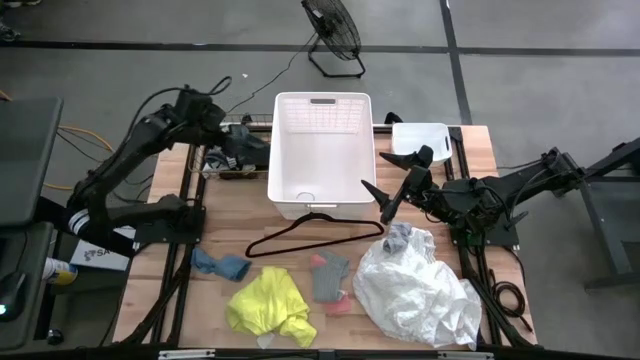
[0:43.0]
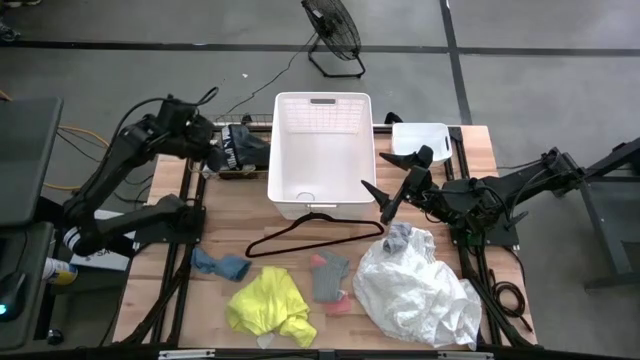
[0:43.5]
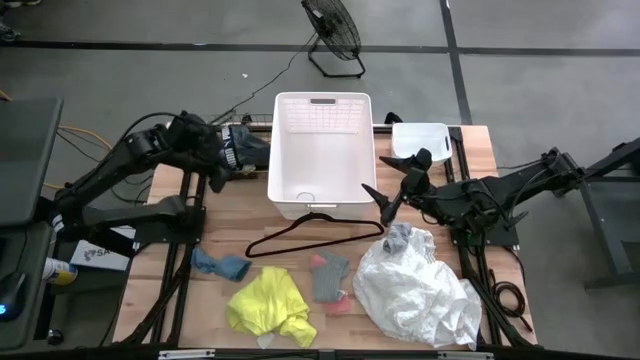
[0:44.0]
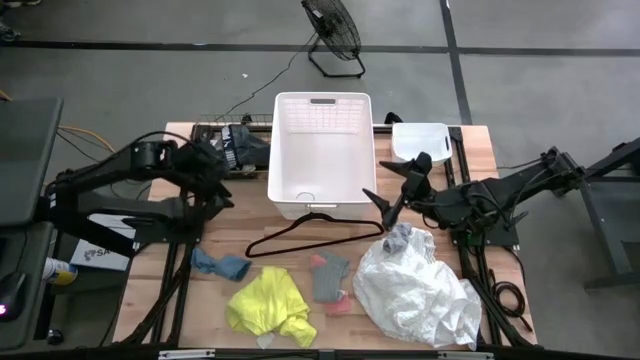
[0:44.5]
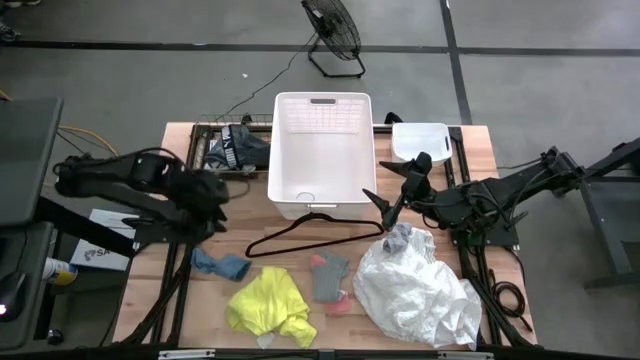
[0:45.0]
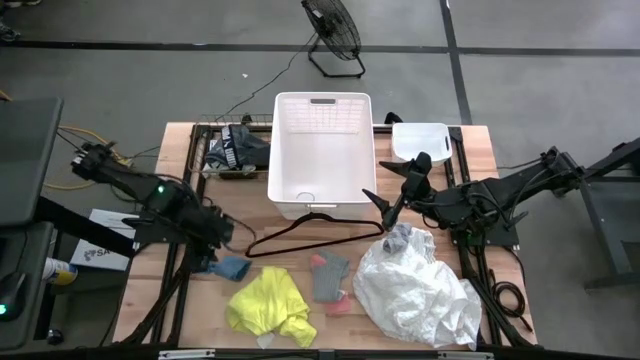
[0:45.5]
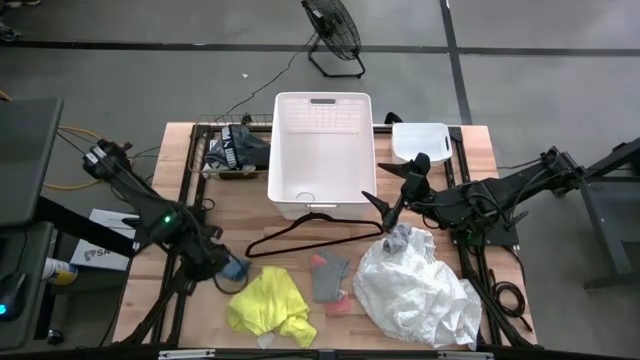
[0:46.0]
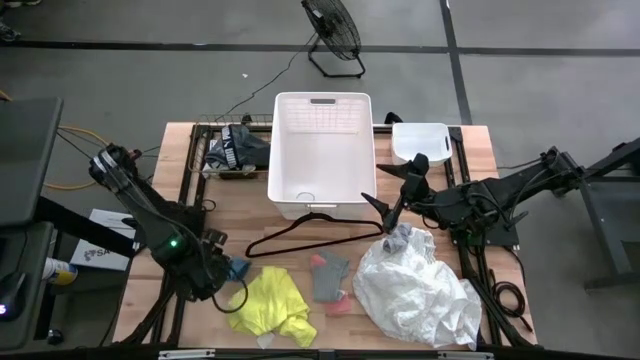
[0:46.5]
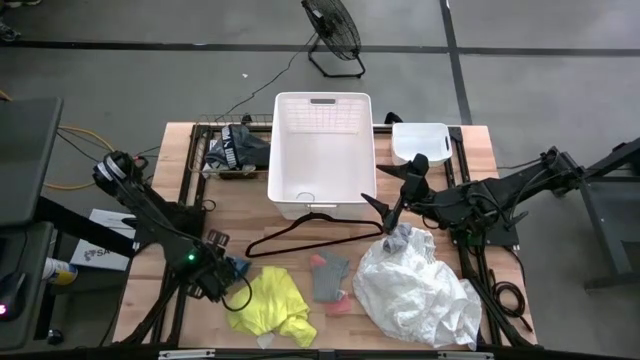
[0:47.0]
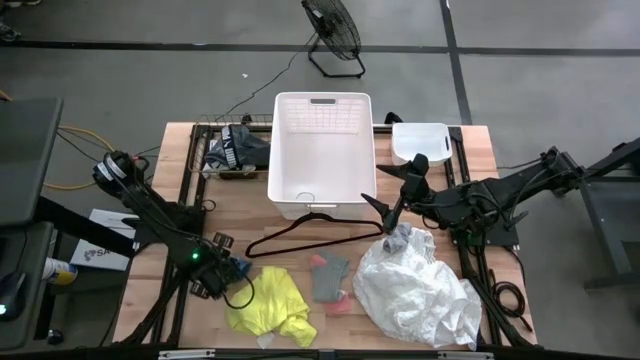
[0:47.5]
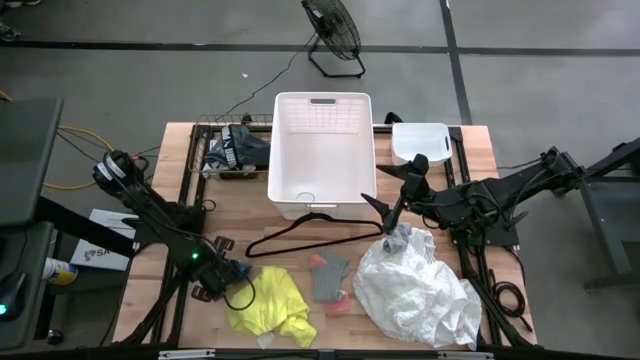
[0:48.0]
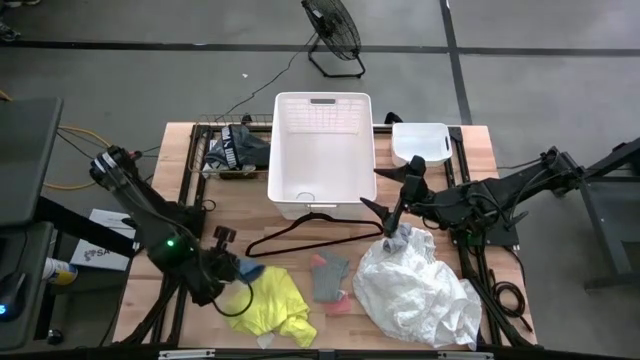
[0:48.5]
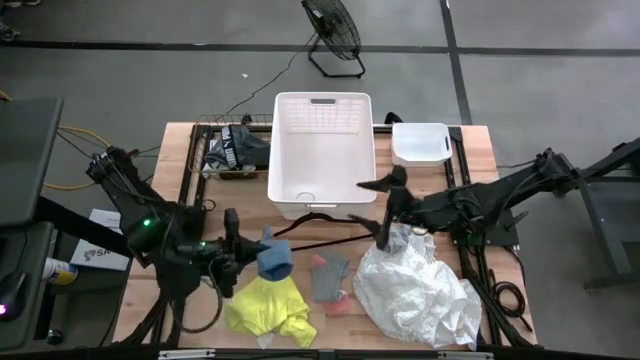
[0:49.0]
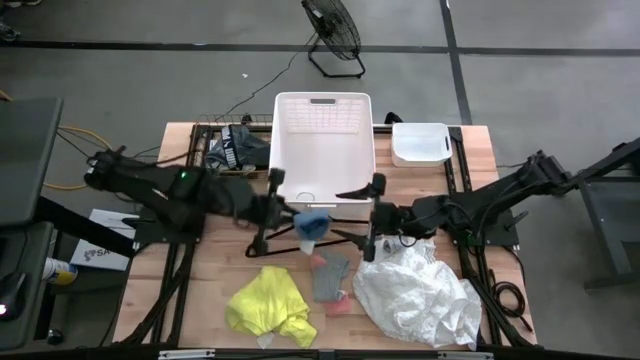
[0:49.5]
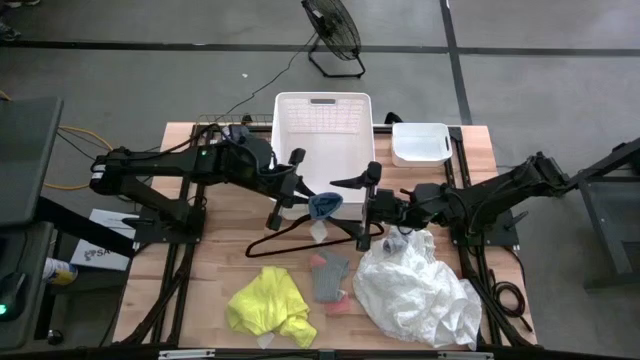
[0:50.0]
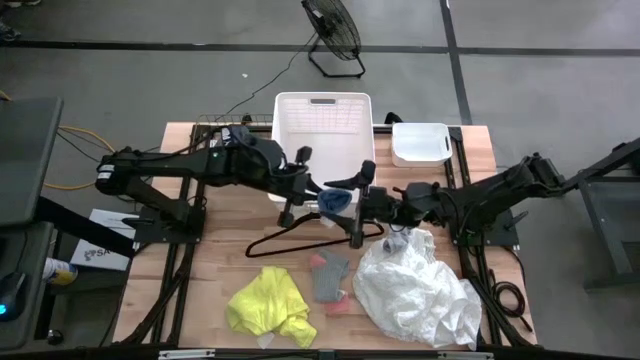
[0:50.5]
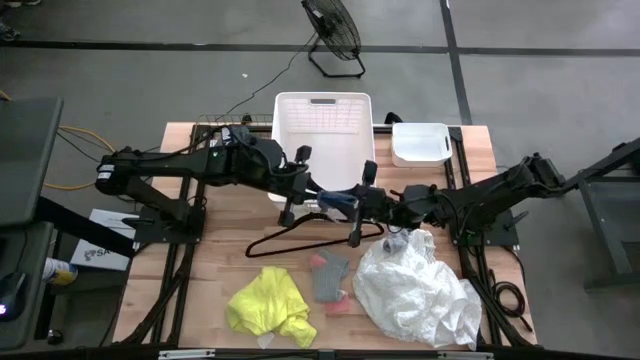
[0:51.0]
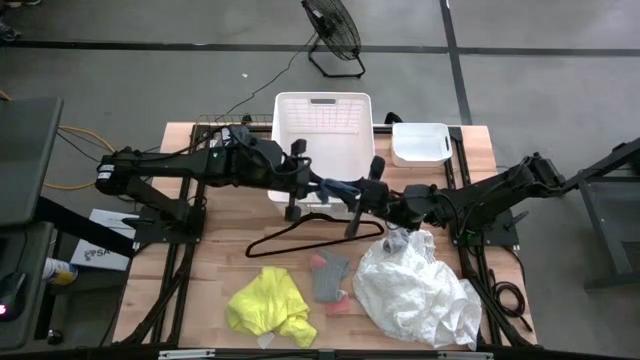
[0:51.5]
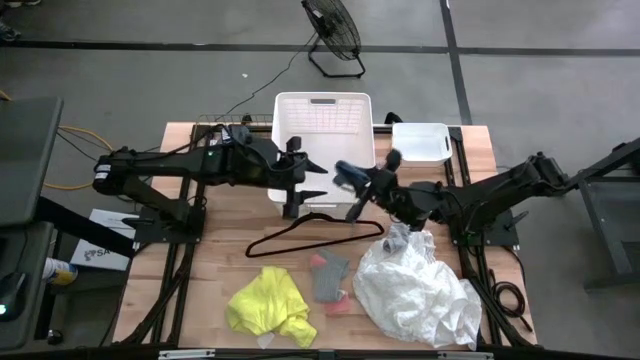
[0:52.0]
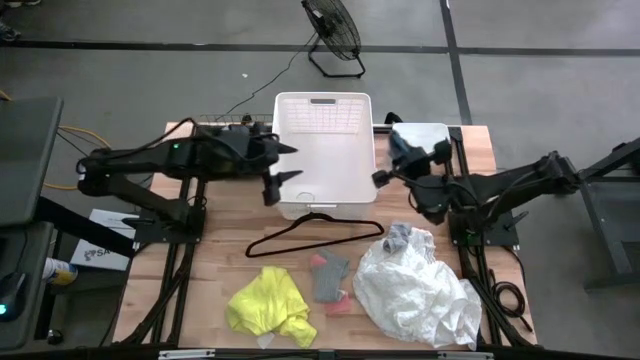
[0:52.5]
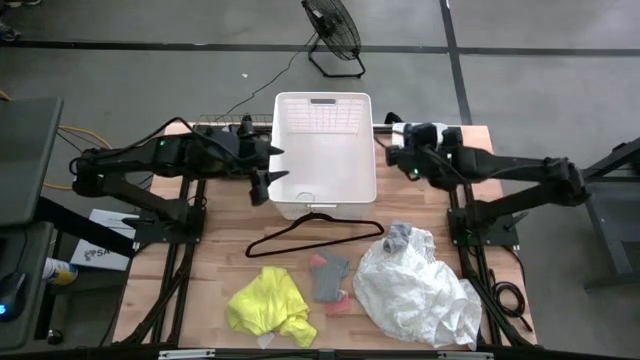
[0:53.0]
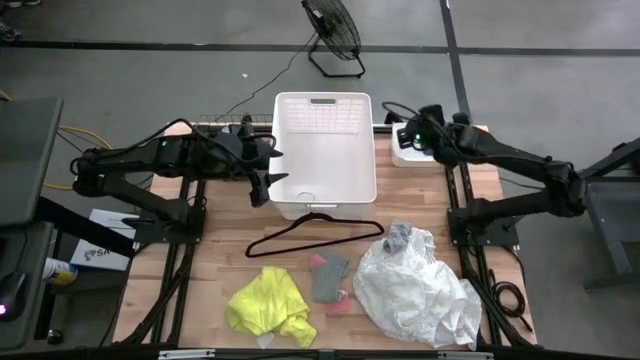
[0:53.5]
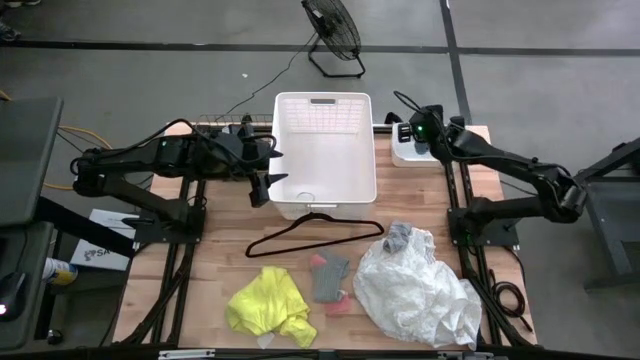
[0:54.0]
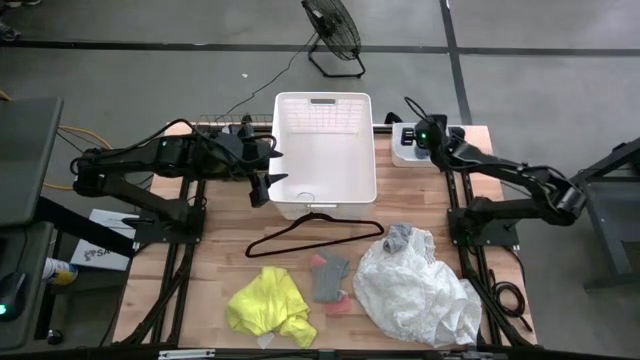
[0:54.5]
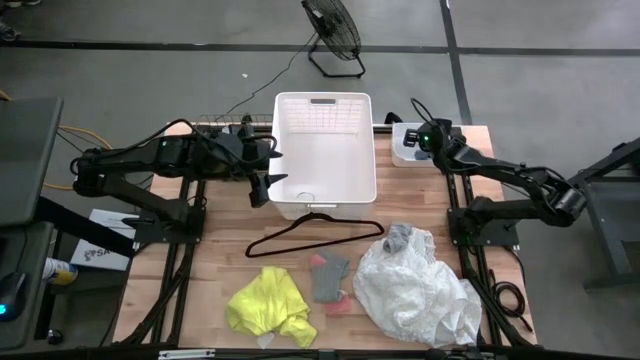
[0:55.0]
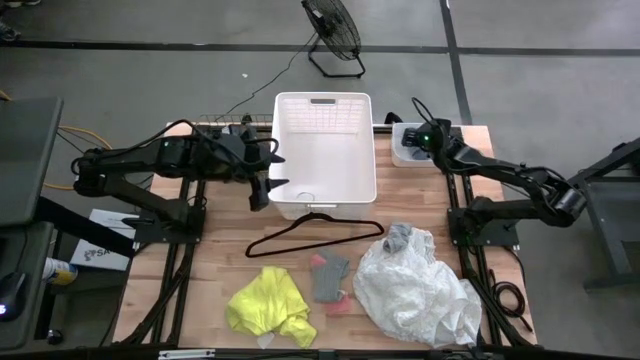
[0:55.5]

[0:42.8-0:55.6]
Task: Pick & Place Cloths
Put the blue sock into the small white bin

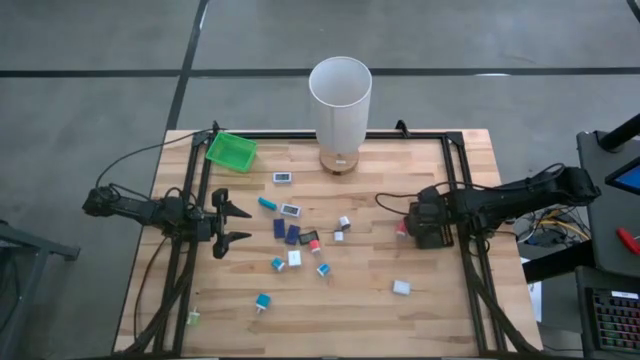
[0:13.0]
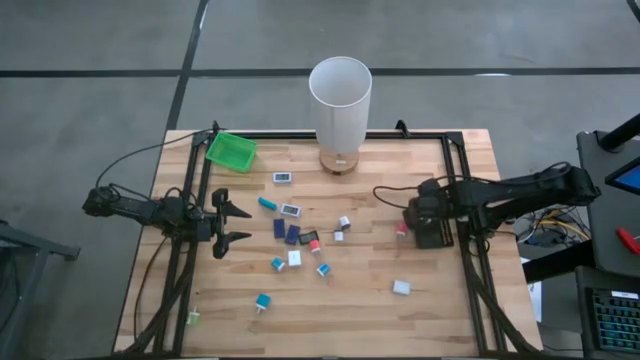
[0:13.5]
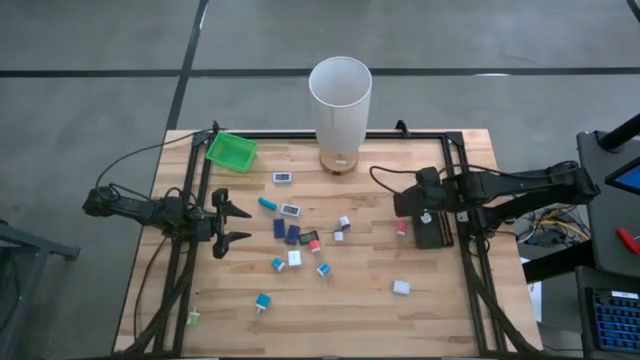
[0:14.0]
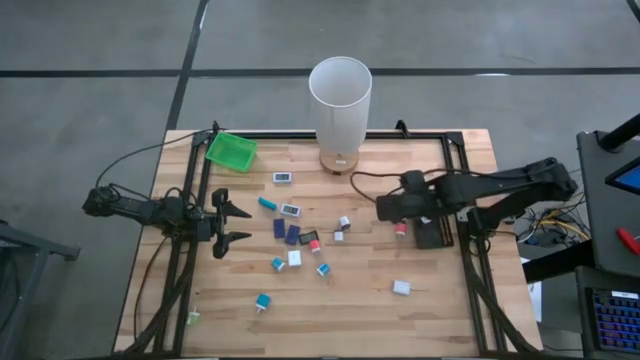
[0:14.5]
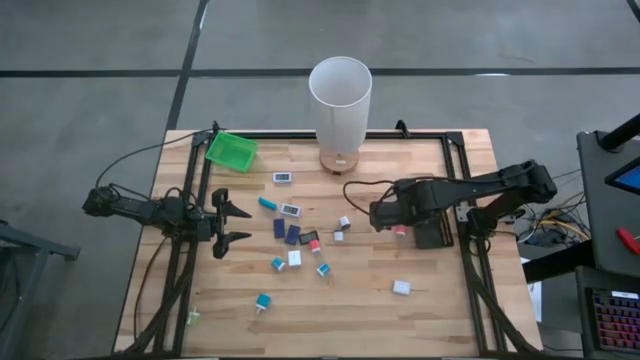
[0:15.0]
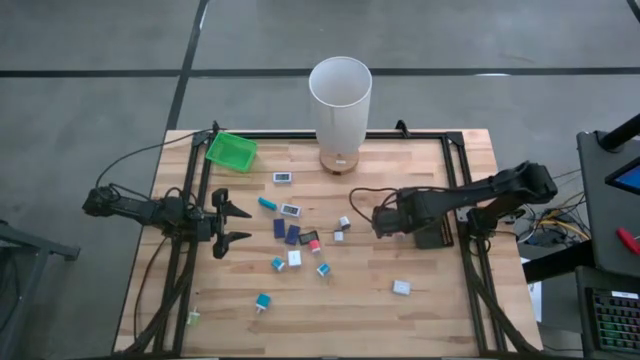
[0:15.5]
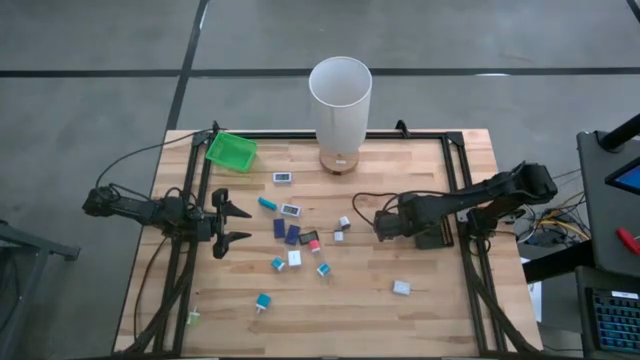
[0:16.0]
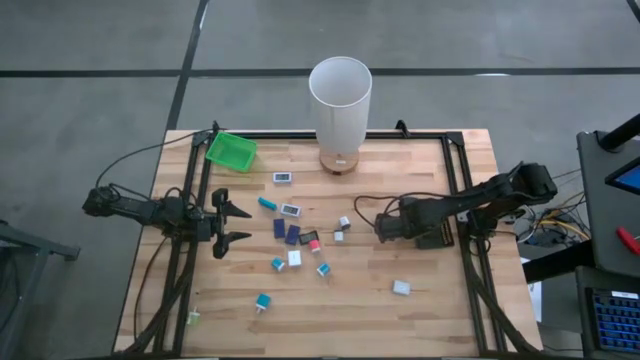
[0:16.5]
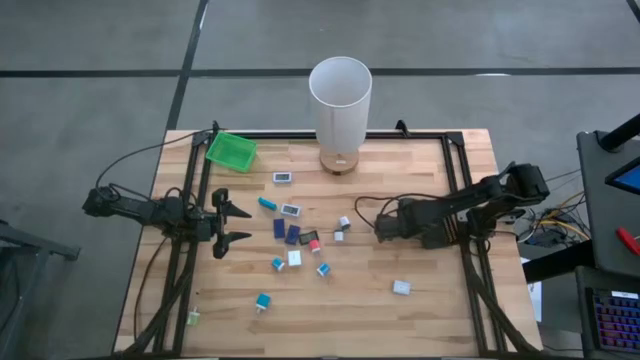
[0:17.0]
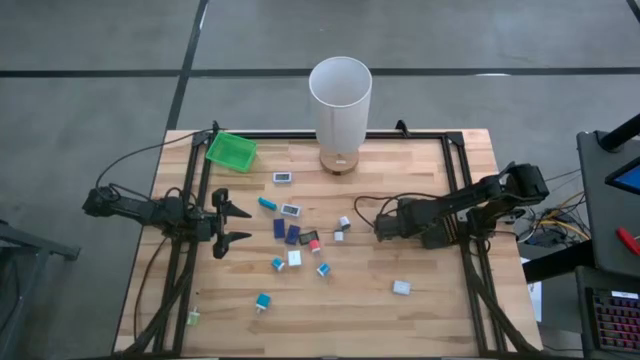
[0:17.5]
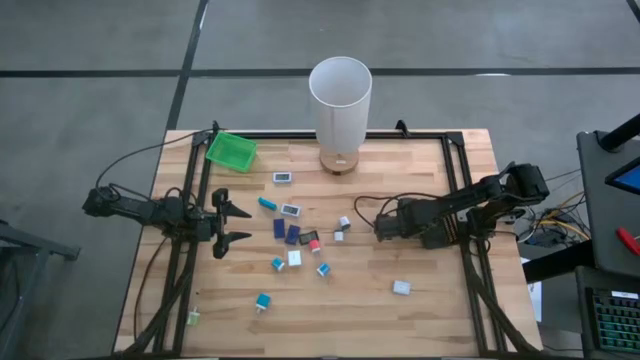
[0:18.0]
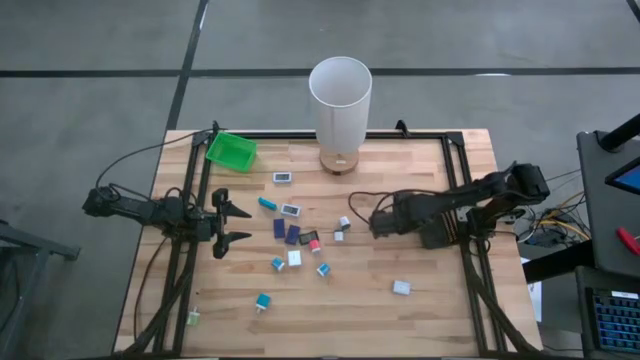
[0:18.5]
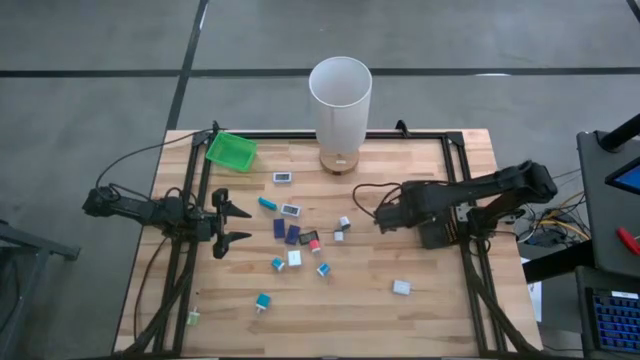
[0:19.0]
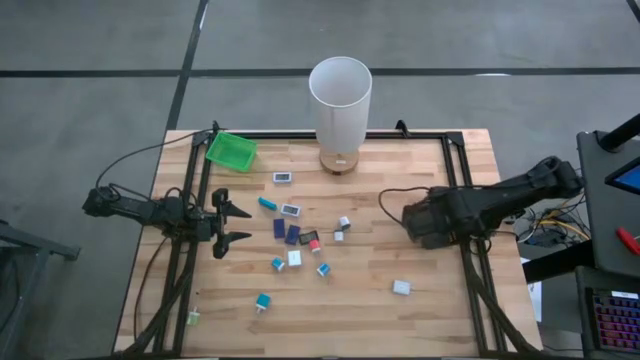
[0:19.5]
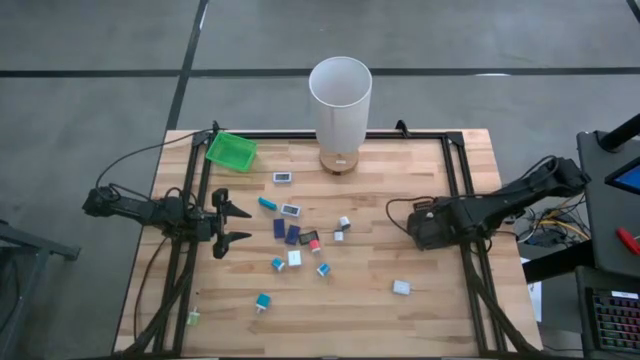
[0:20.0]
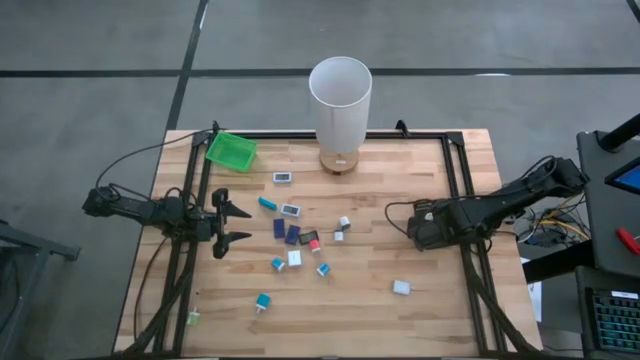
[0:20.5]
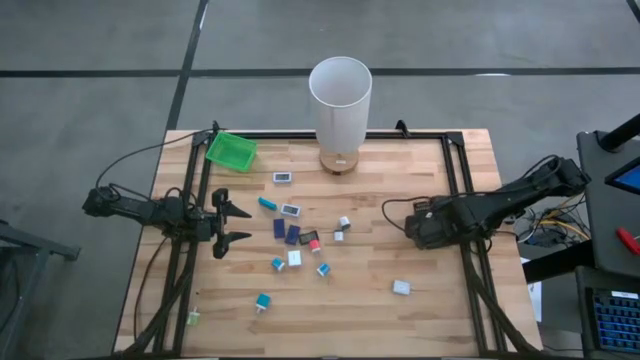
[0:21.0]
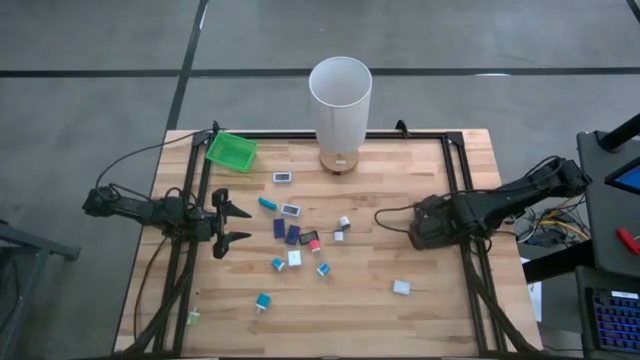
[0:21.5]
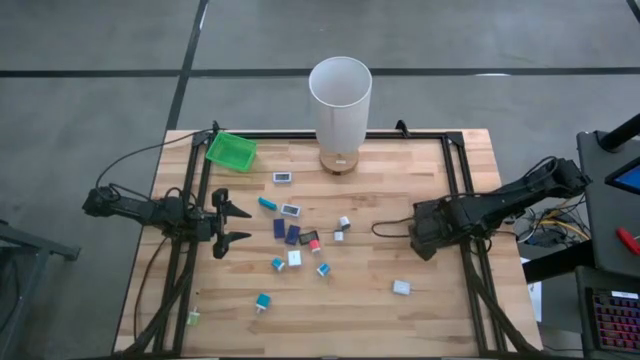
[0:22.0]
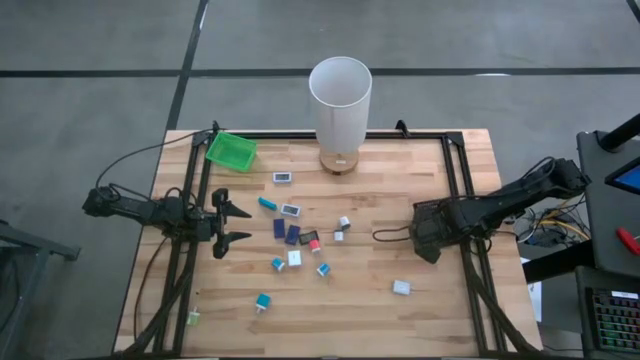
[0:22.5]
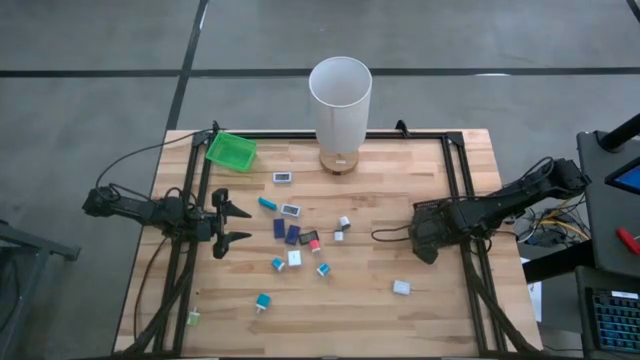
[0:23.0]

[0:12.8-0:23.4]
Task: Pick & Place Office items
Put the right pink charger adapter into the black bin
